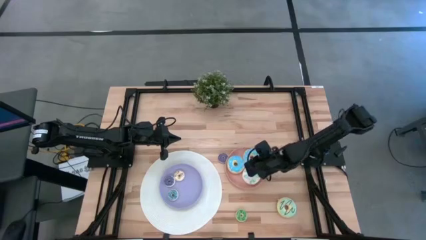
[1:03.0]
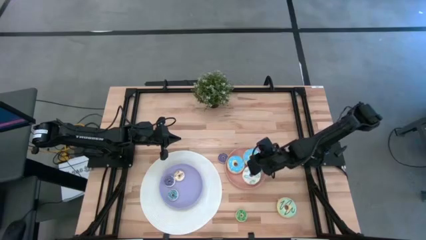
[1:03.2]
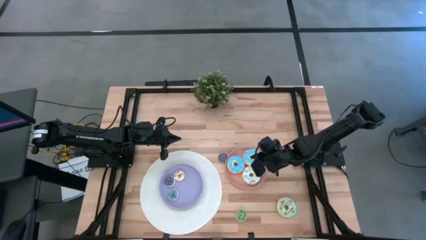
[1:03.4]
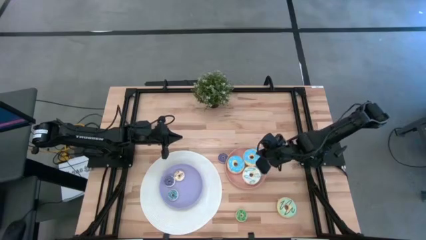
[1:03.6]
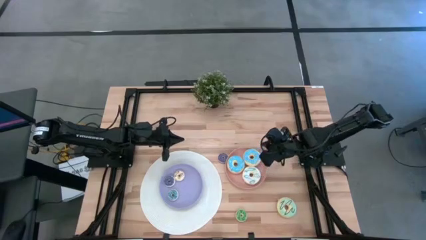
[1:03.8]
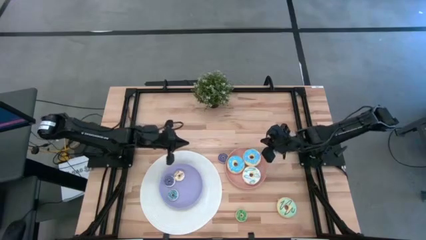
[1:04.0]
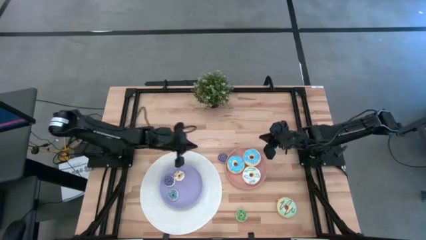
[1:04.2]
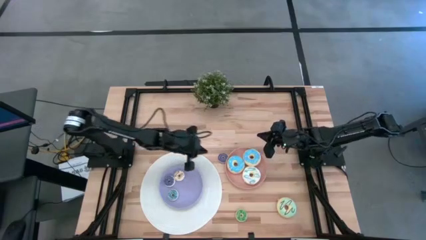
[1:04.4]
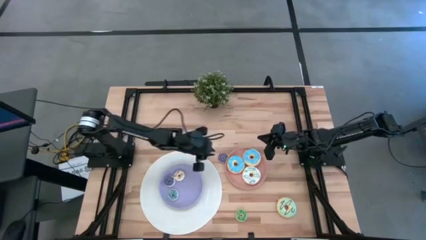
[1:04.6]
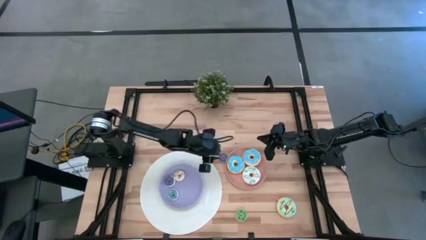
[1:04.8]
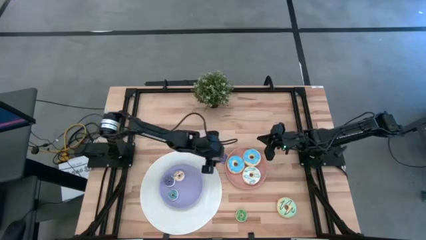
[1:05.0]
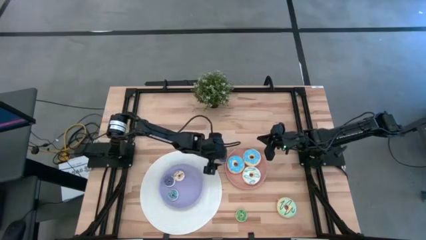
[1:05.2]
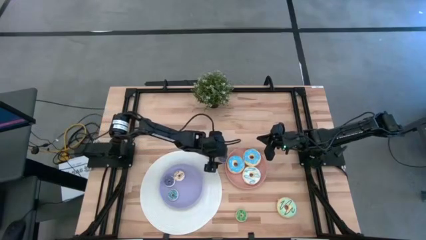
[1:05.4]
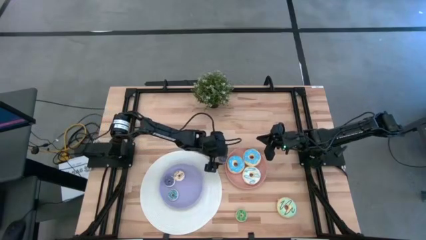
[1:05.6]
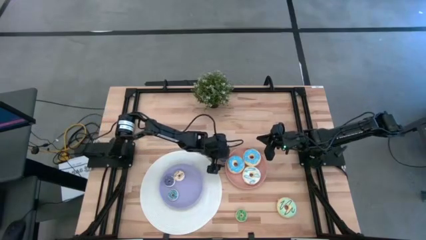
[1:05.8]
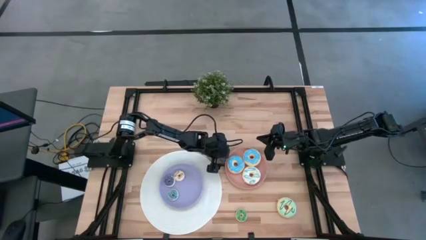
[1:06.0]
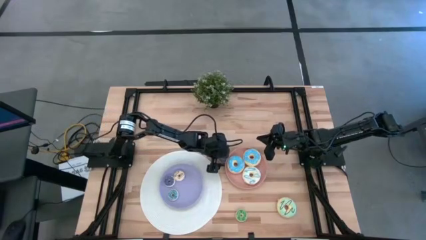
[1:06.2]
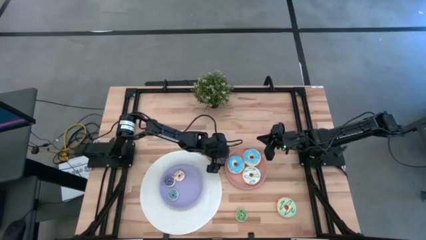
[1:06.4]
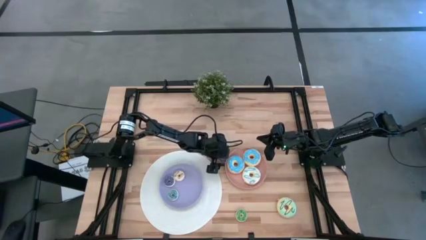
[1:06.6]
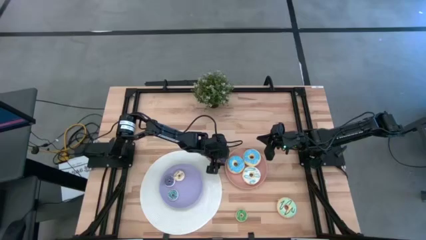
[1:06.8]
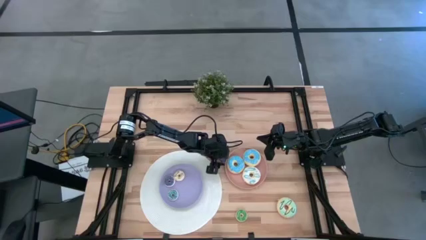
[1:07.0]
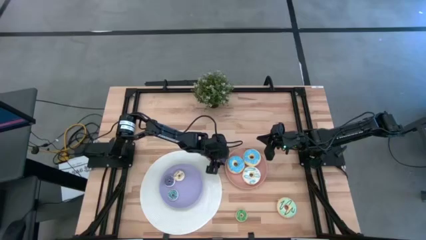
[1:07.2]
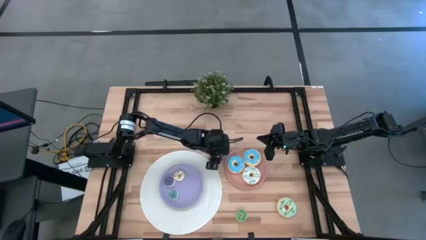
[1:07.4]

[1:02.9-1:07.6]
Task: Pick & Place donuts
Put the small violet donut on the violet plate

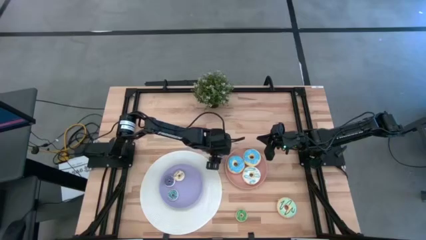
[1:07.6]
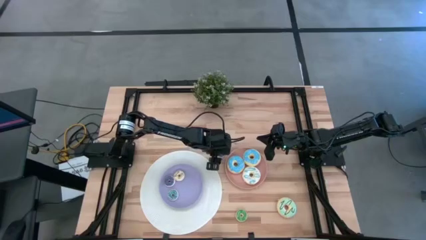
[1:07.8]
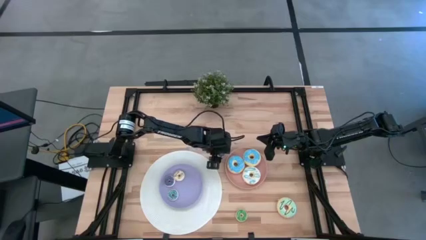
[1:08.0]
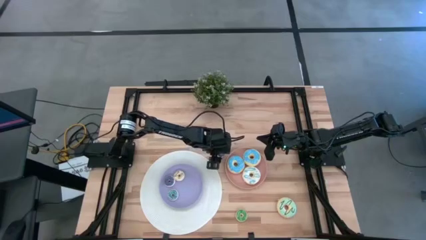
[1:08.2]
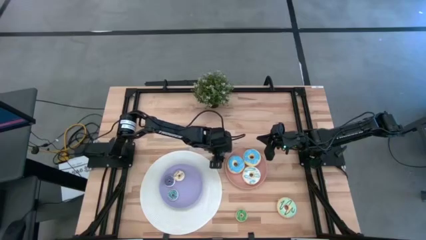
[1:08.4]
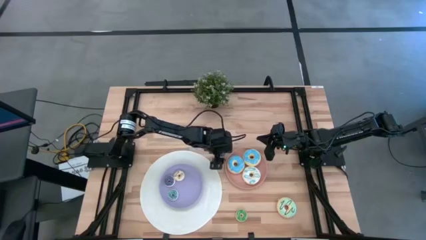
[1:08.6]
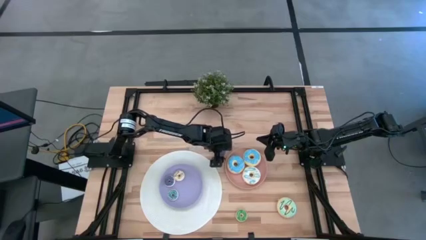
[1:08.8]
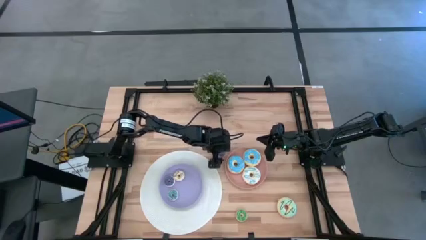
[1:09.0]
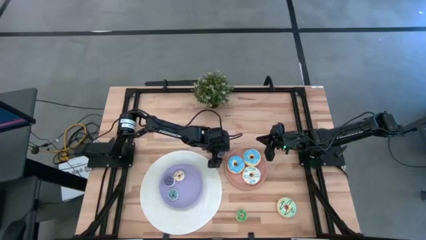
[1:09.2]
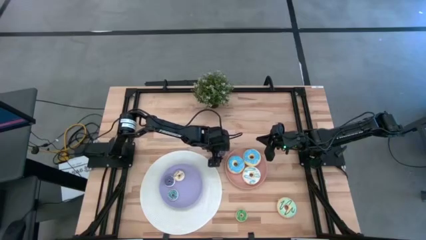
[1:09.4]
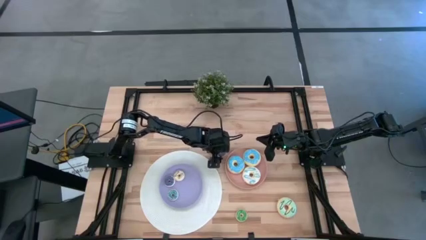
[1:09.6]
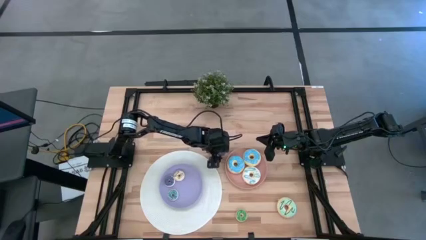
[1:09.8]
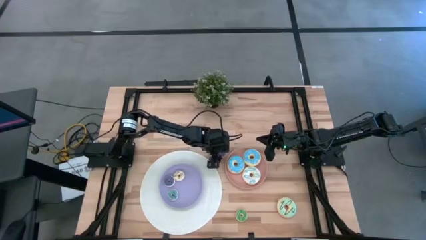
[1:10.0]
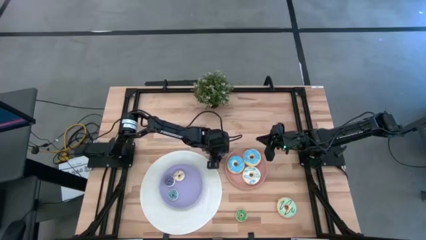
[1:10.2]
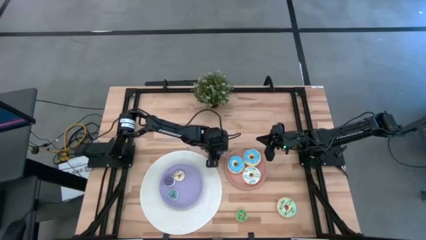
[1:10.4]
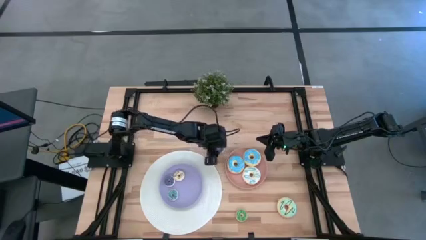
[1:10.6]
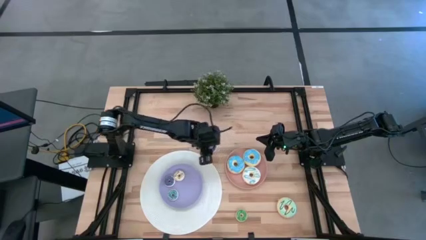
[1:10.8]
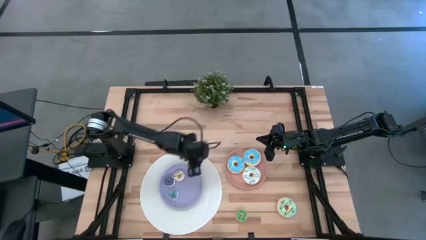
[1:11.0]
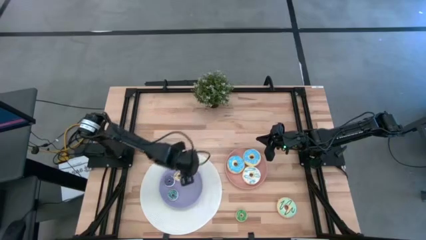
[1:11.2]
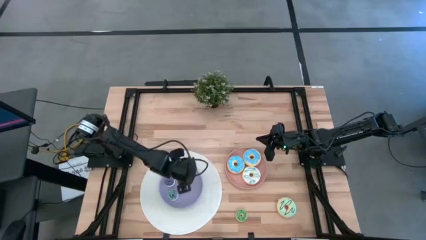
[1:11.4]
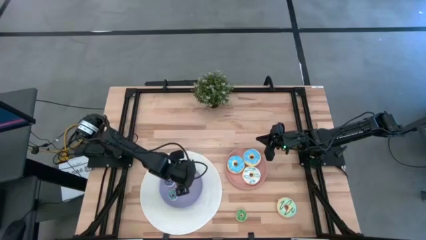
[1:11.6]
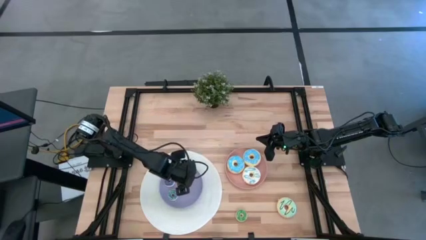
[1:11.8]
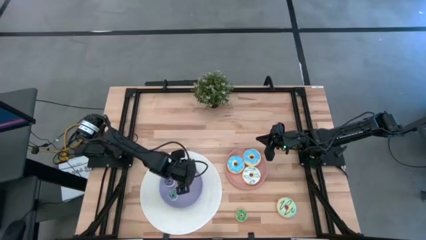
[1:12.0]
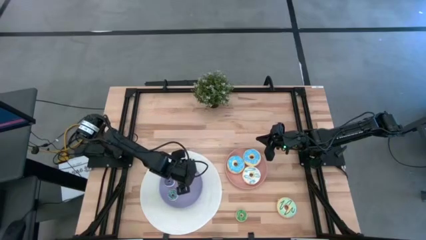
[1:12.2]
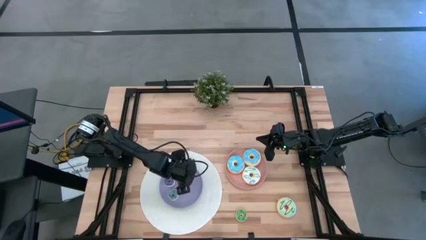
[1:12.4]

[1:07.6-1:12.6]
Put the small violet donut on the violet plate

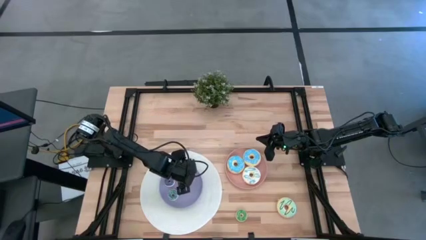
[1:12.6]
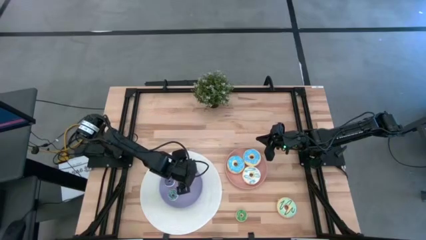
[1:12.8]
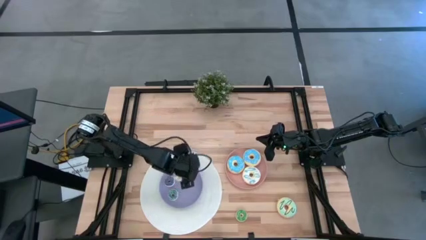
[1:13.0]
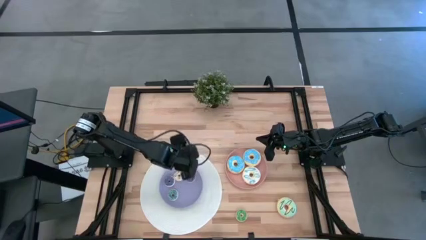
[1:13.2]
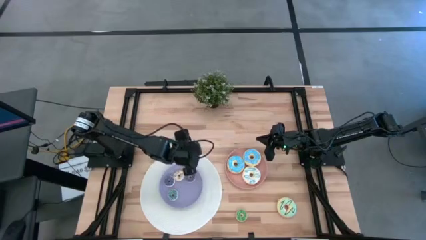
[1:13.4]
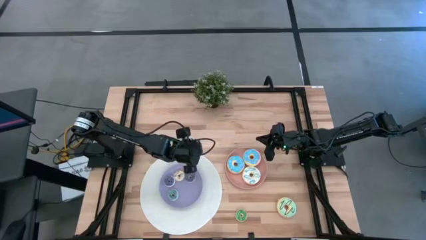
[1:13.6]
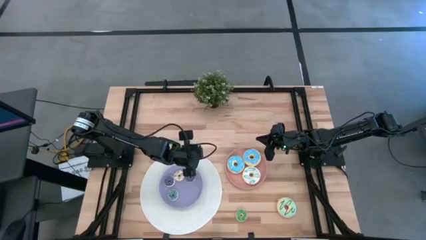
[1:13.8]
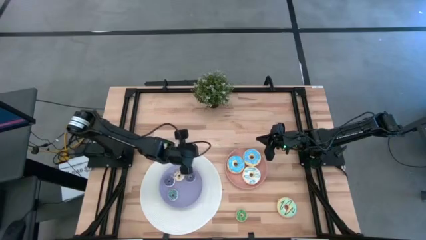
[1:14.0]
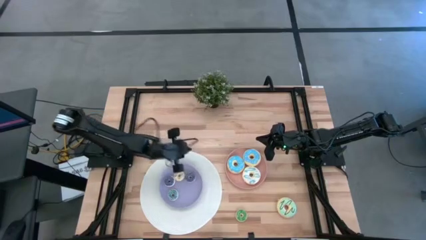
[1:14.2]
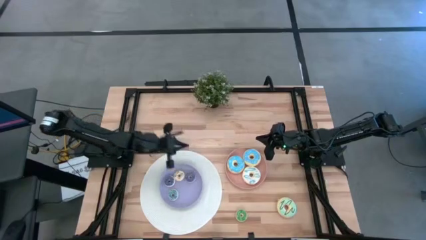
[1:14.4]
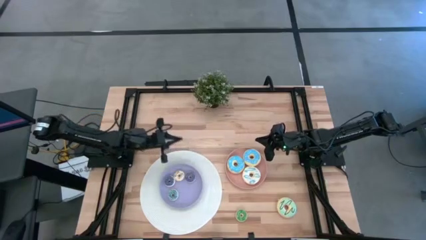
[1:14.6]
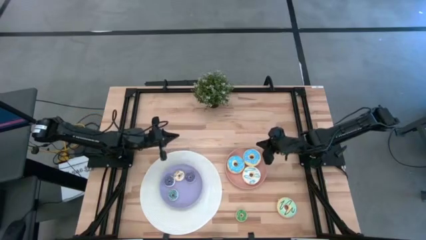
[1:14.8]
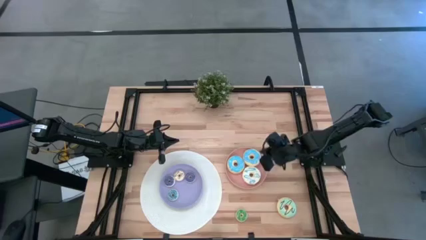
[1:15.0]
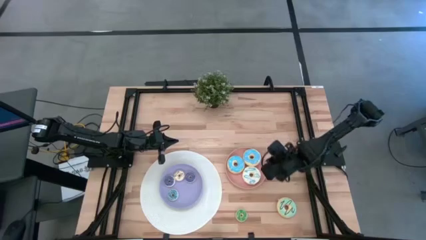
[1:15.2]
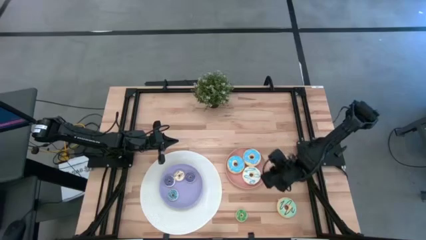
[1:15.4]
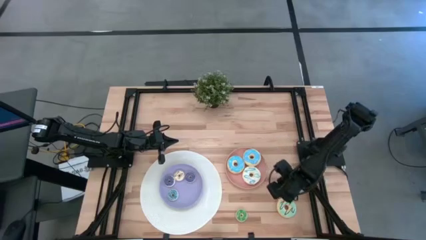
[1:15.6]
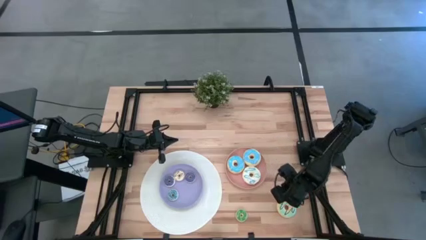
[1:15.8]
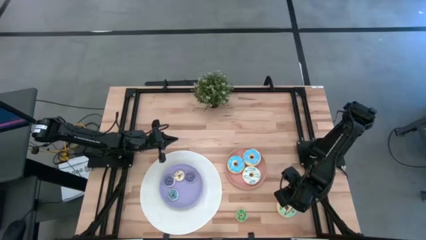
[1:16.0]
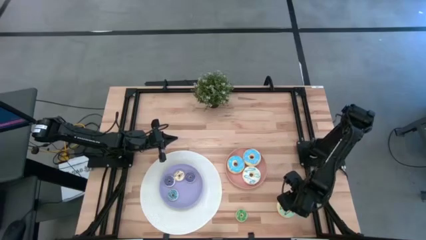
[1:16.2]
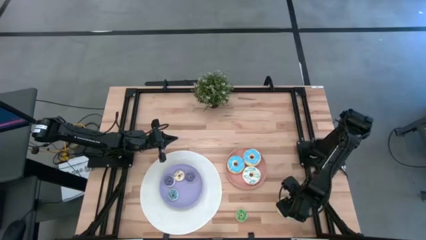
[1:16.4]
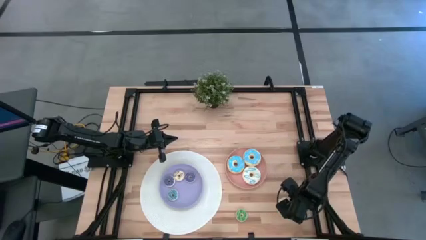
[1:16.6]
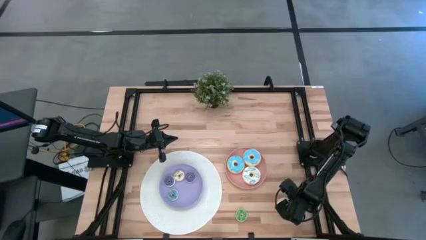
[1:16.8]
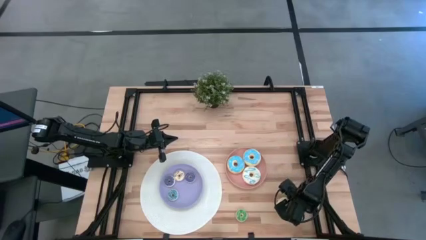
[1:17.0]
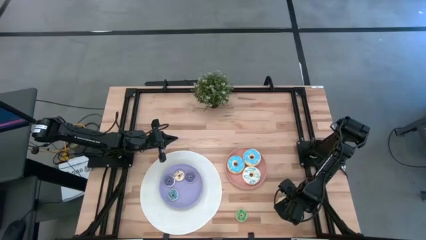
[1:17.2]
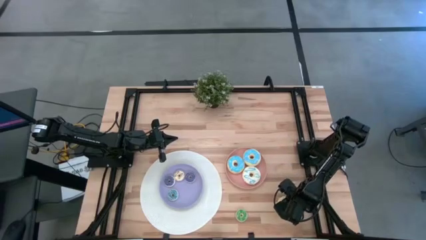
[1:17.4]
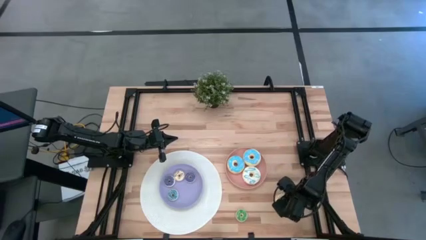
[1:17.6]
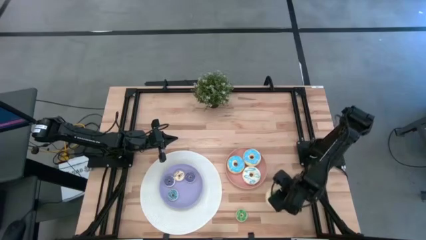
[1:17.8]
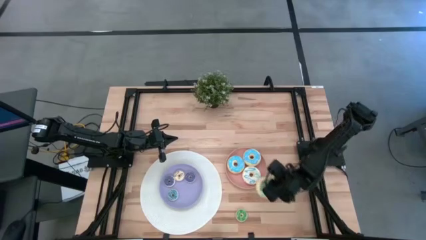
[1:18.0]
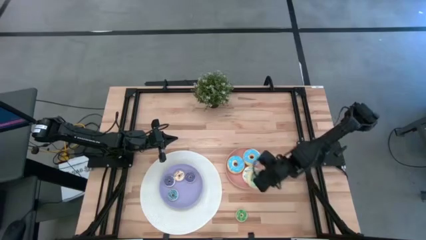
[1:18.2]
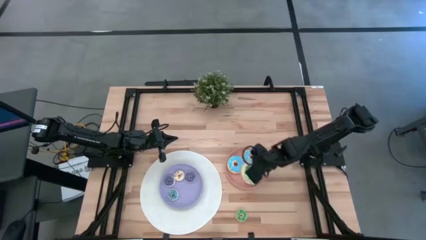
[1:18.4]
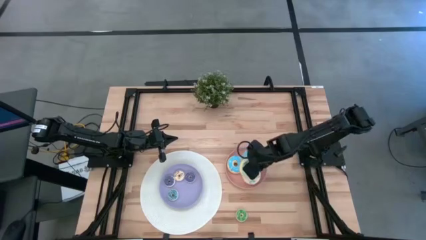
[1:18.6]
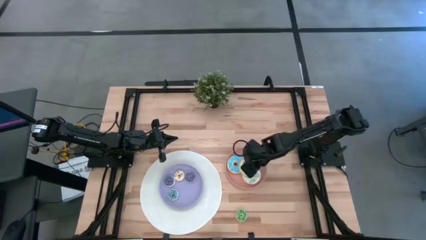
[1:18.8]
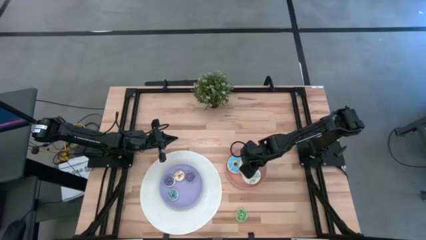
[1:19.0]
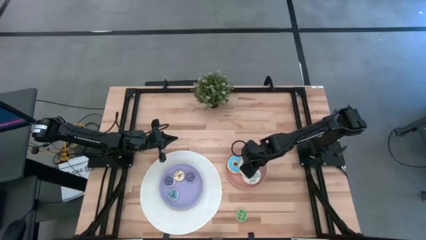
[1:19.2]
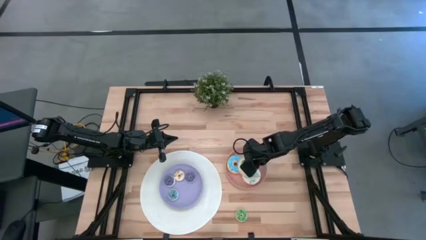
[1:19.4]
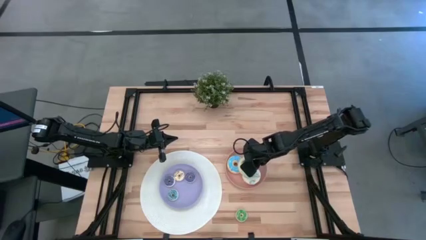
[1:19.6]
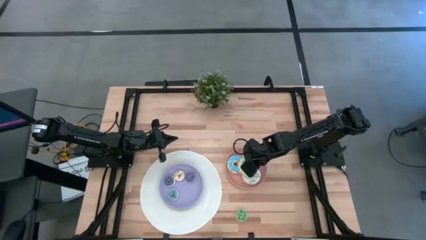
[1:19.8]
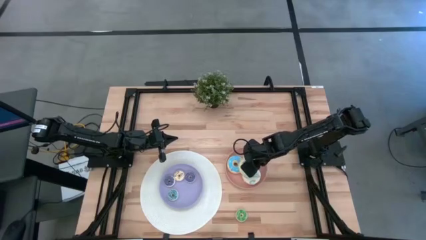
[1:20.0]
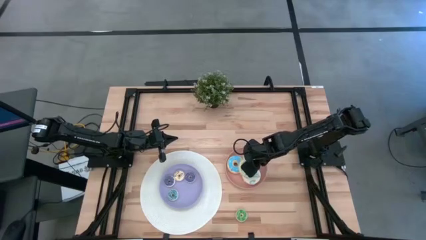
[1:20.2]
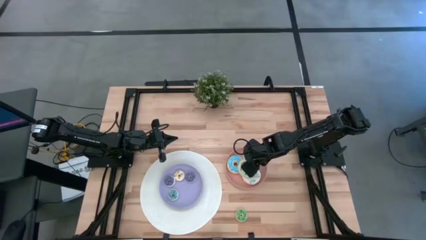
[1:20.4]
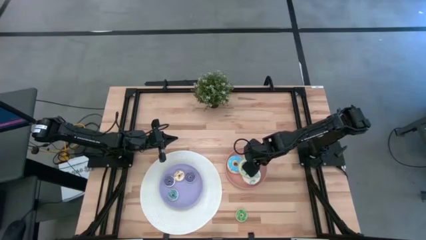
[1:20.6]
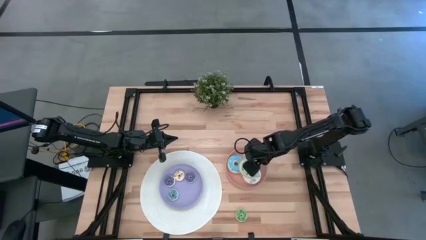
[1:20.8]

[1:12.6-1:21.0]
Put the big light green donut on the pink plate
